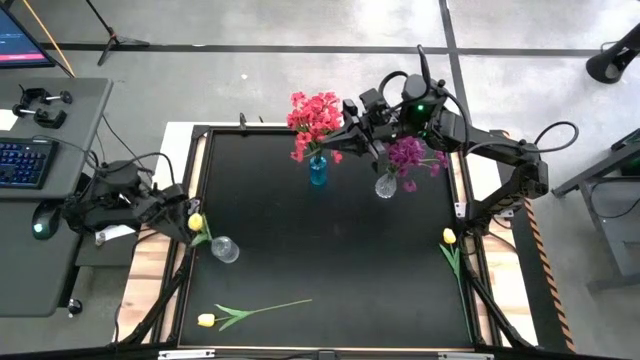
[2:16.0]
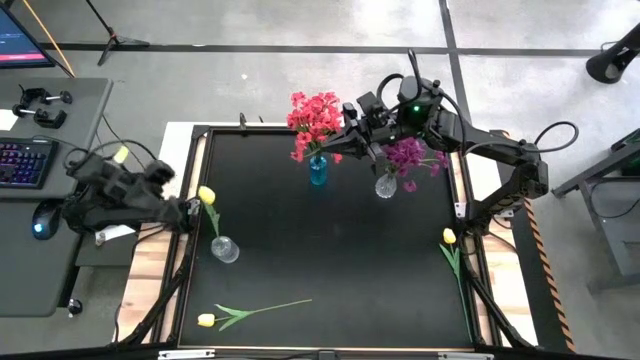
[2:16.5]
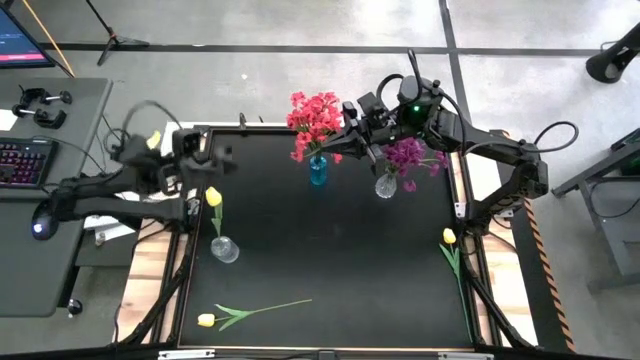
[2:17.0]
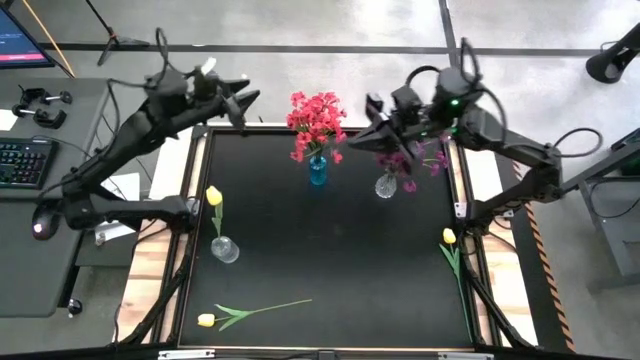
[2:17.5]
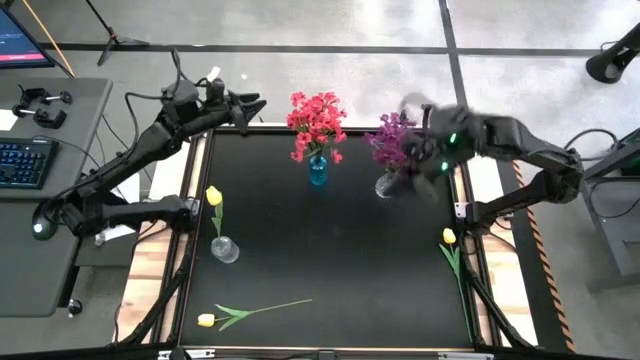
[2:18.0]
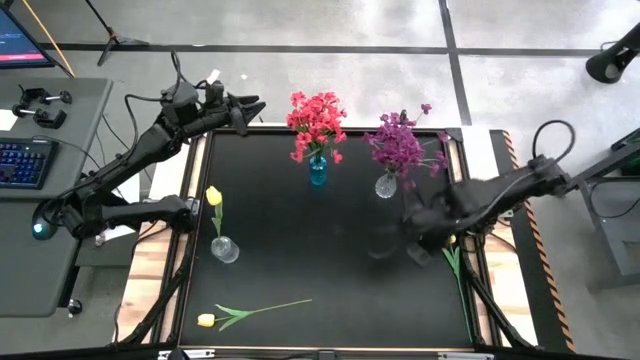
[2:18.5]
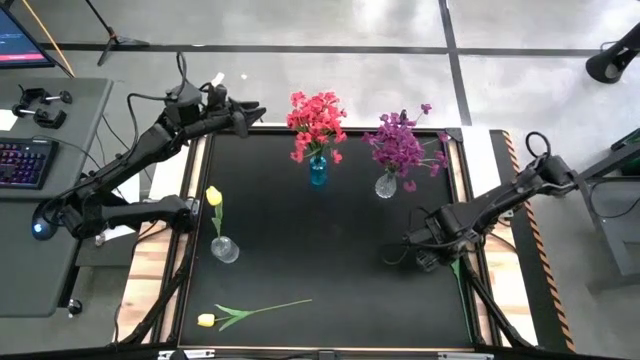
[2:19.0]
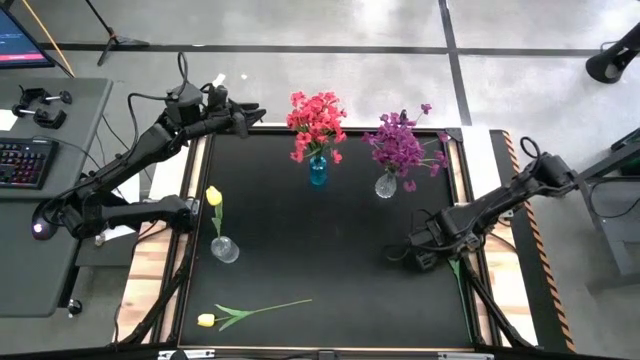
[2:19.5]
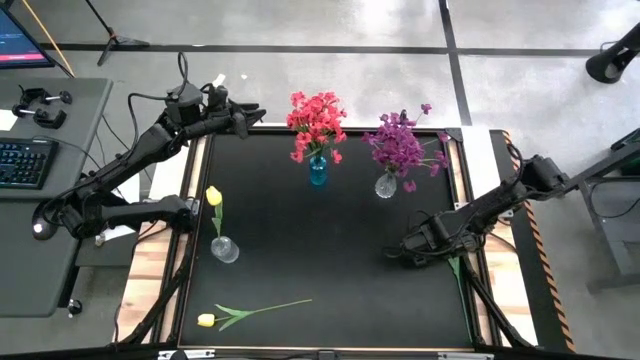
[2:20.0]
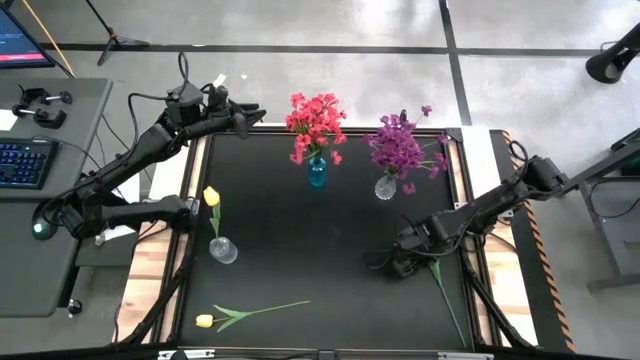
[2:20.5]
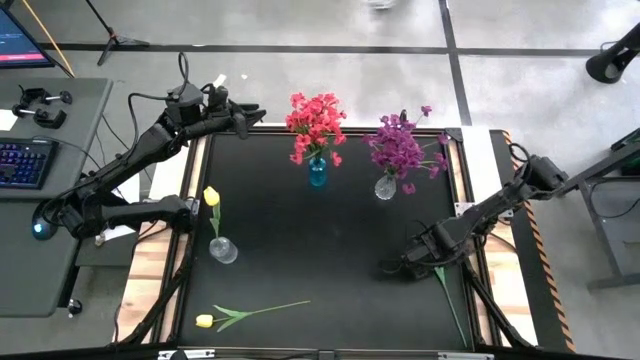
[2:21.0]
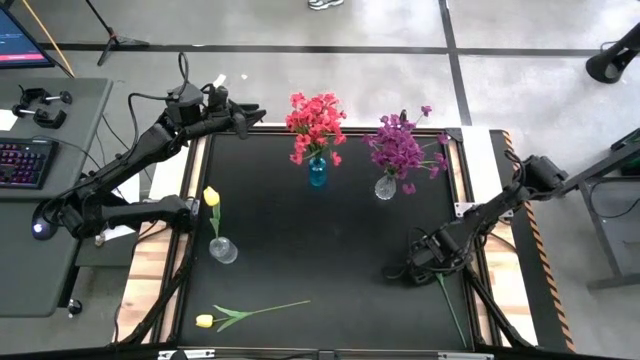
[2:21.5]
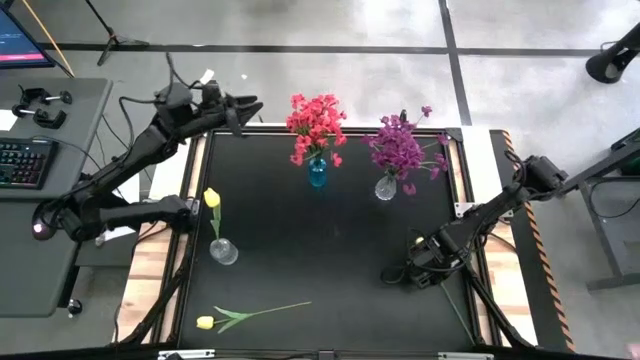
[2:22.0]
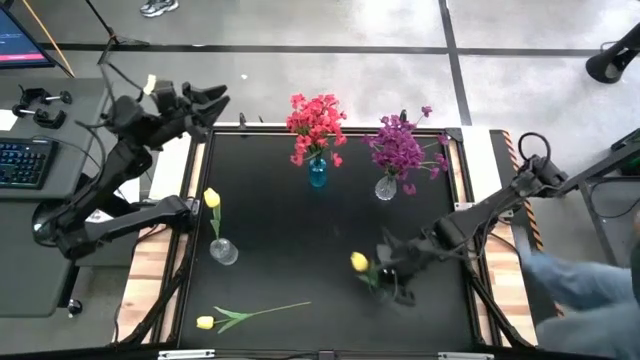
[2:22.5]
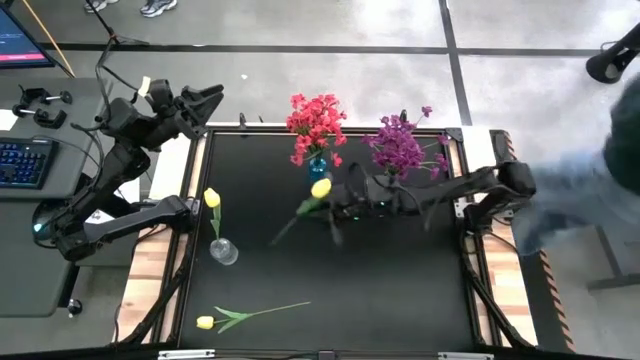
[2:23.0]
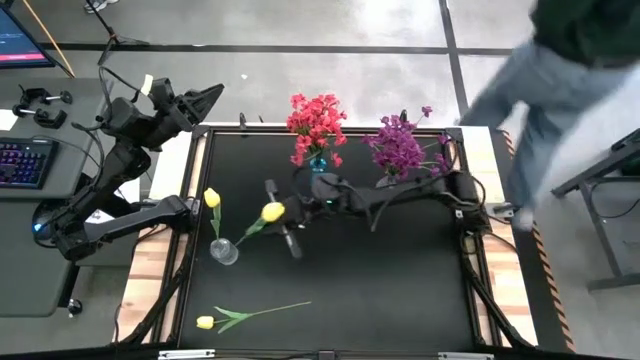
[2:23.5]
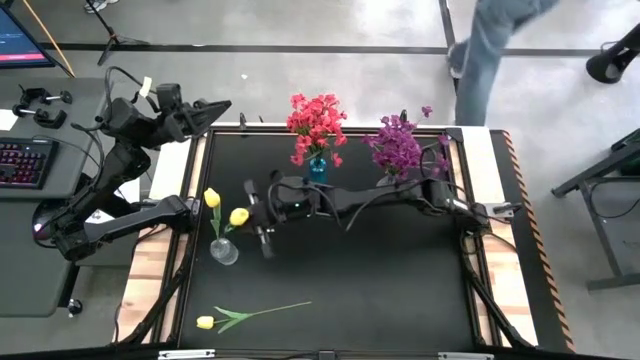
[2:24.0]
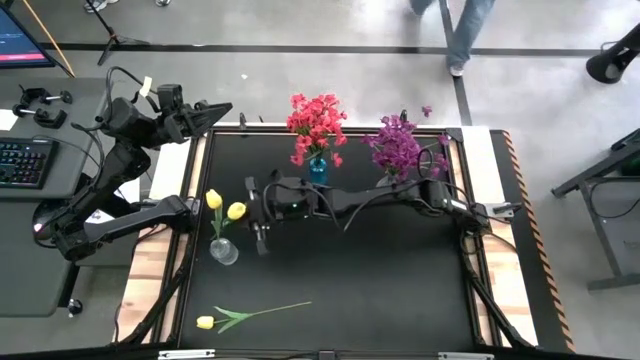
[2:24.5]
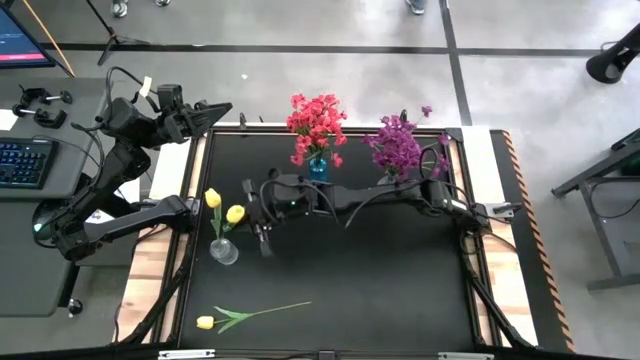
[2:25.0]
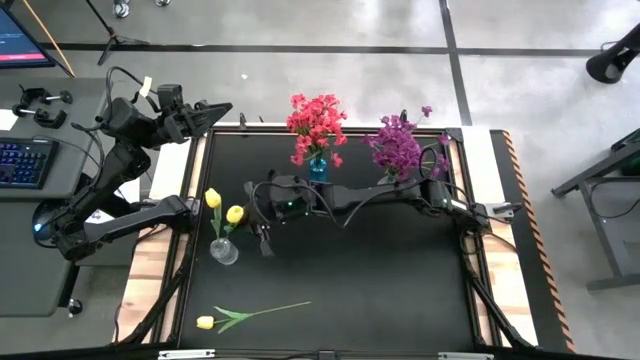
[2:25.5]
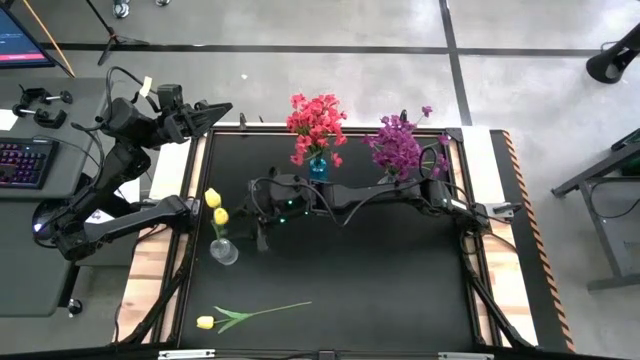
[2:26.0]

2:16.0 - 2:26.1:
Task: Sort flowers into vase by color
Put the right yellow flower into the bottom transparent vase

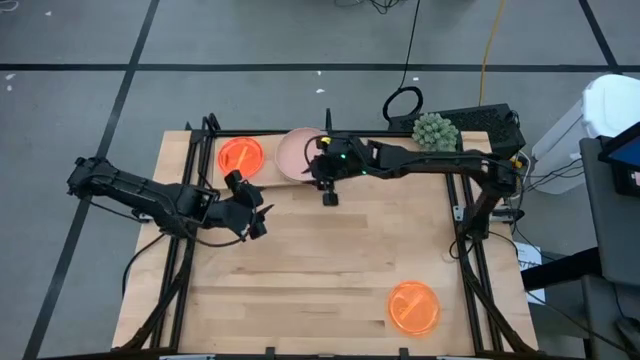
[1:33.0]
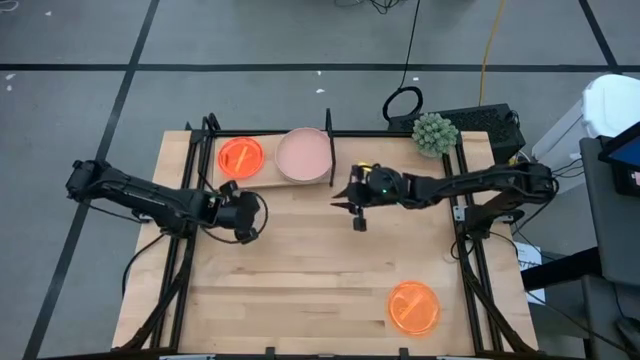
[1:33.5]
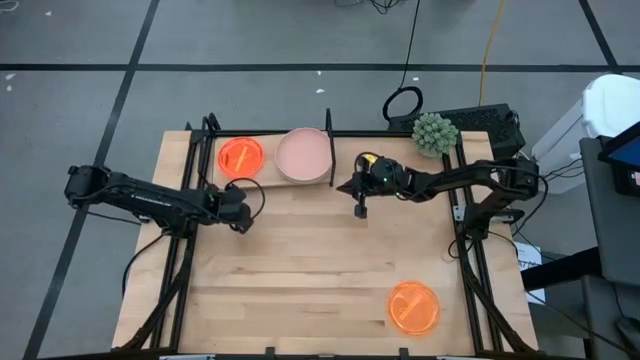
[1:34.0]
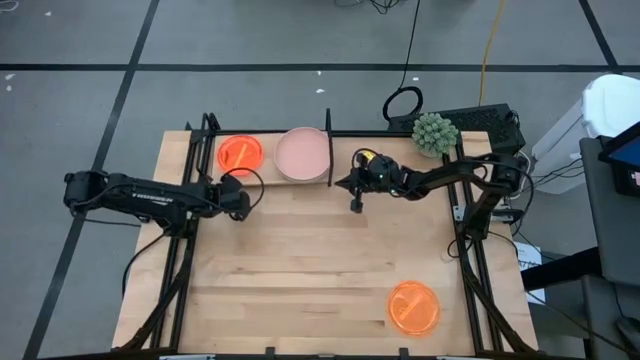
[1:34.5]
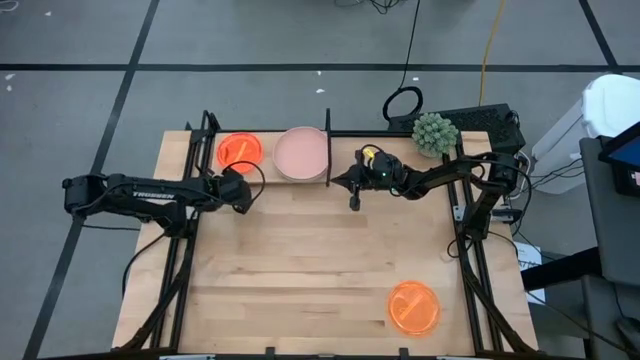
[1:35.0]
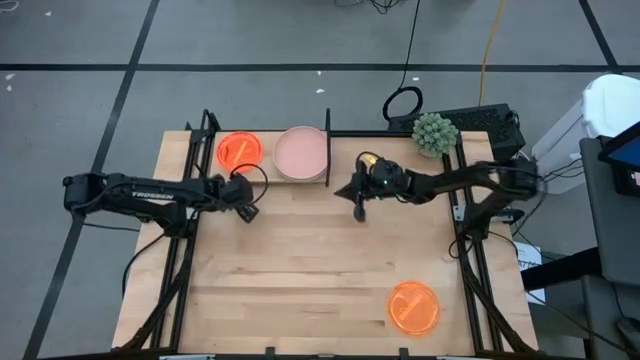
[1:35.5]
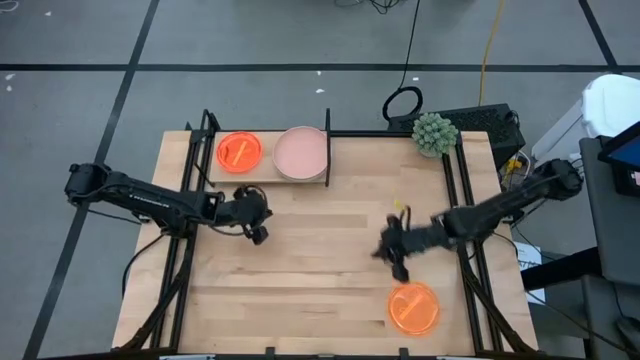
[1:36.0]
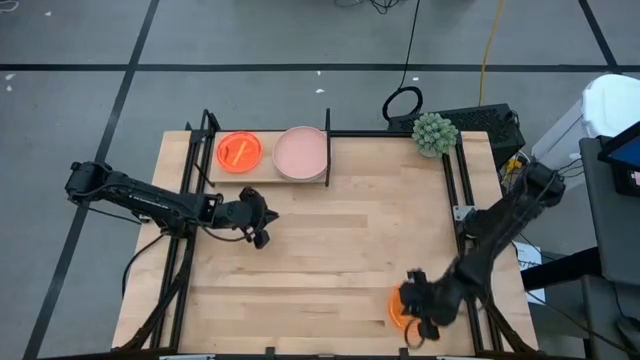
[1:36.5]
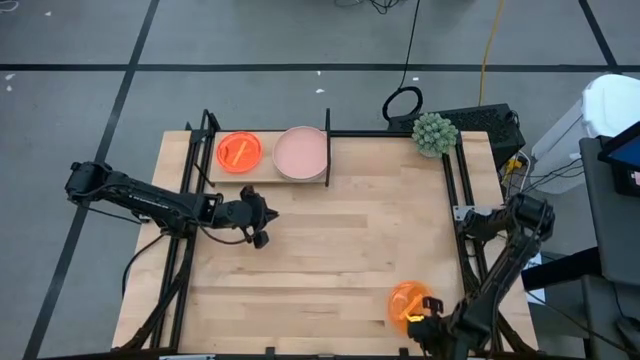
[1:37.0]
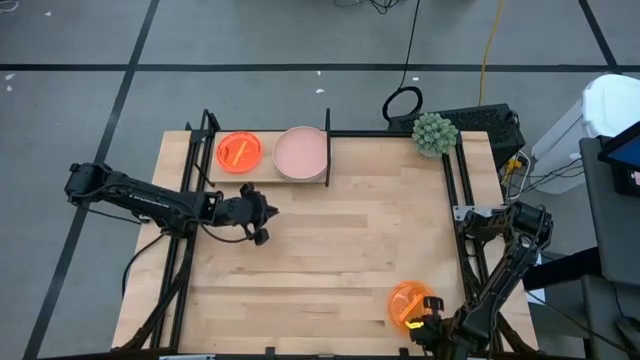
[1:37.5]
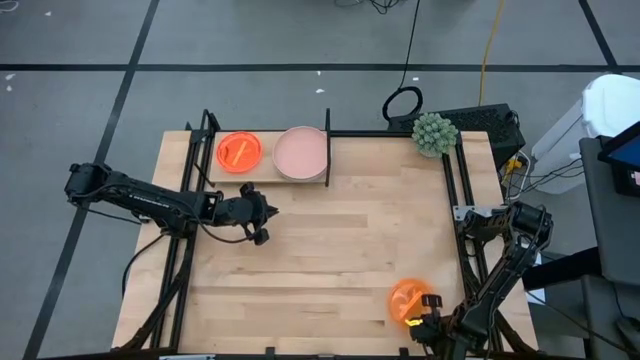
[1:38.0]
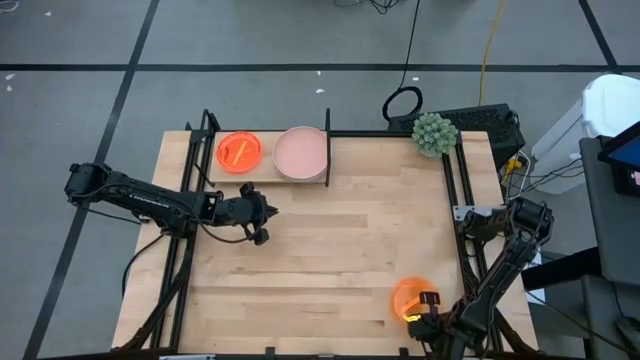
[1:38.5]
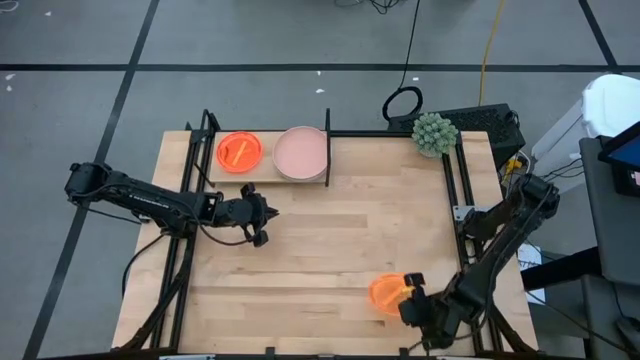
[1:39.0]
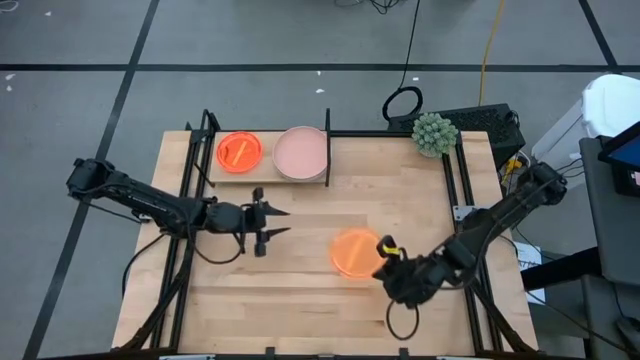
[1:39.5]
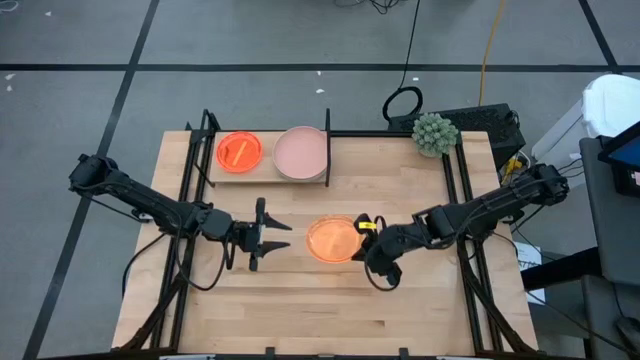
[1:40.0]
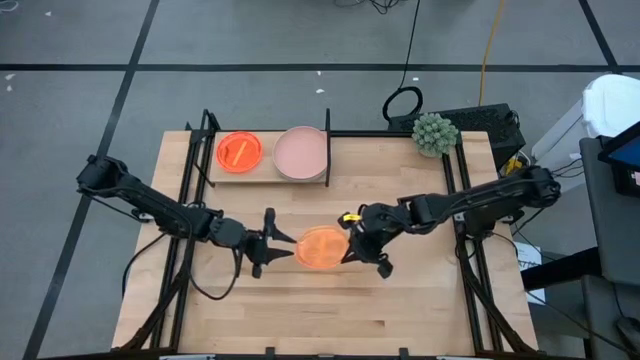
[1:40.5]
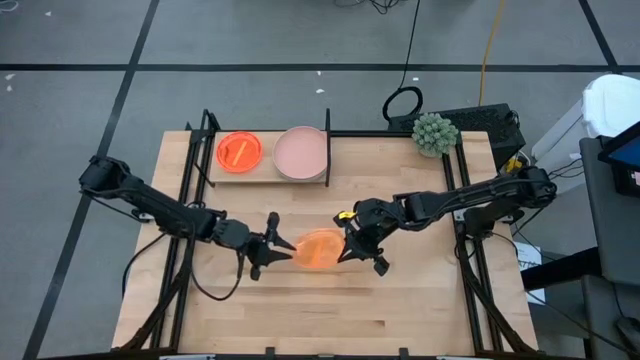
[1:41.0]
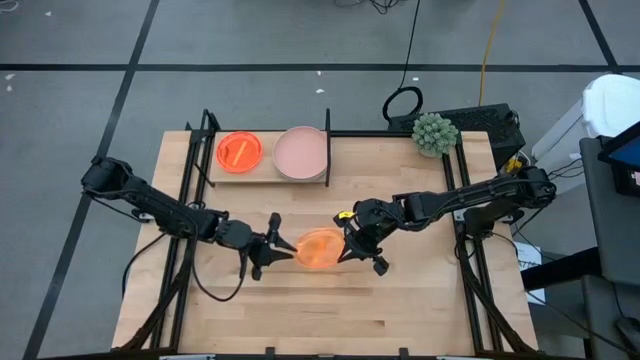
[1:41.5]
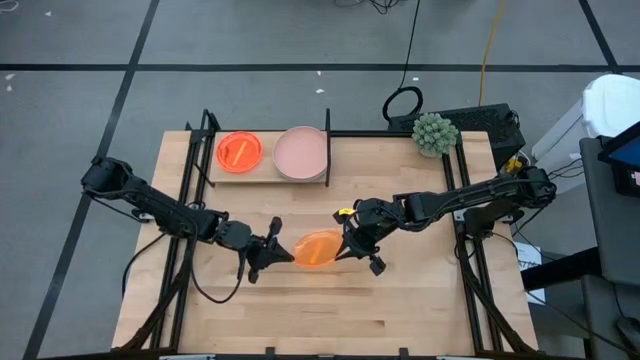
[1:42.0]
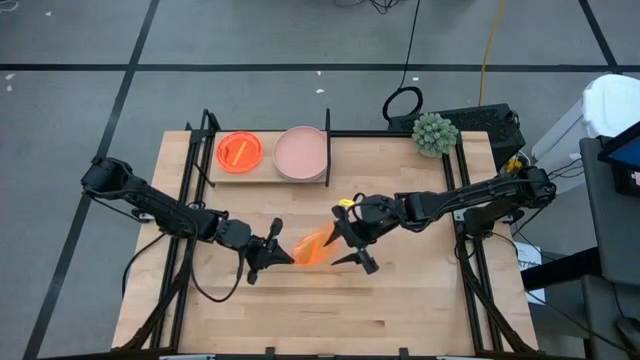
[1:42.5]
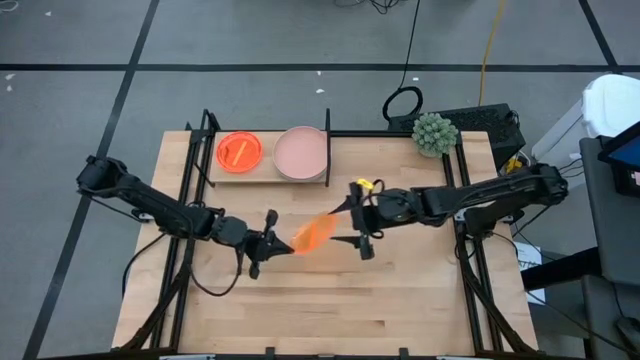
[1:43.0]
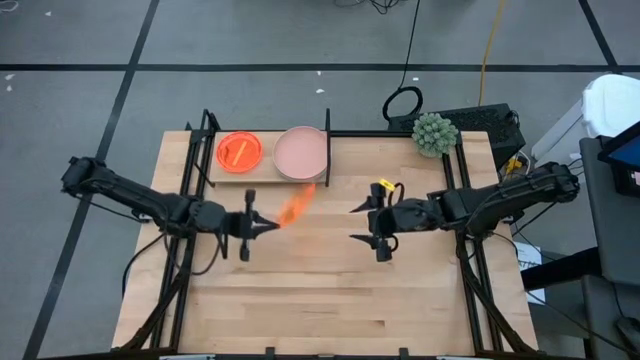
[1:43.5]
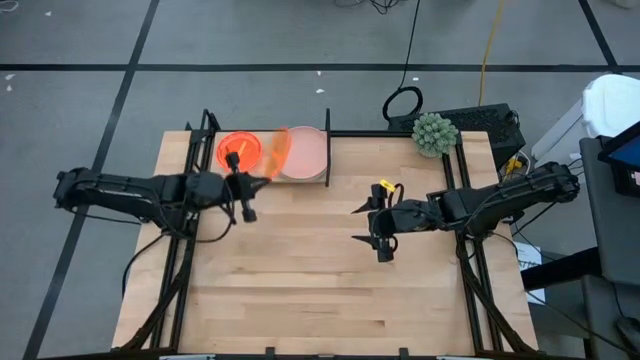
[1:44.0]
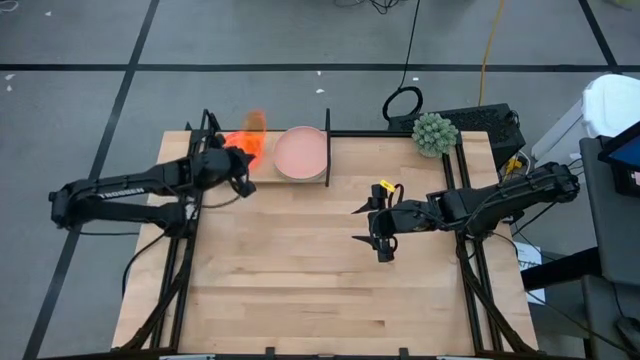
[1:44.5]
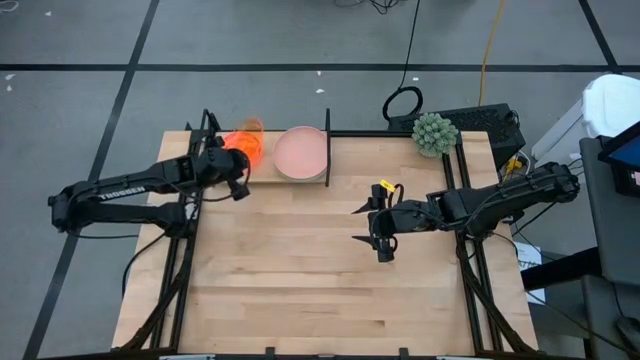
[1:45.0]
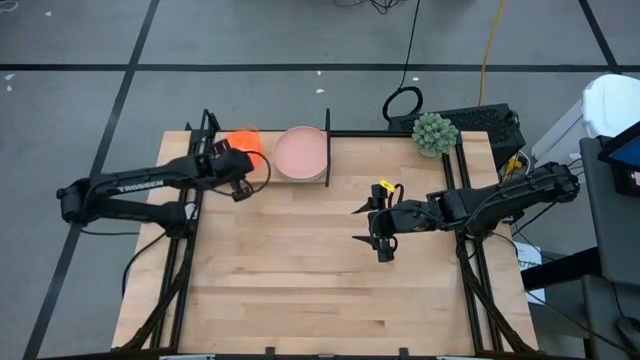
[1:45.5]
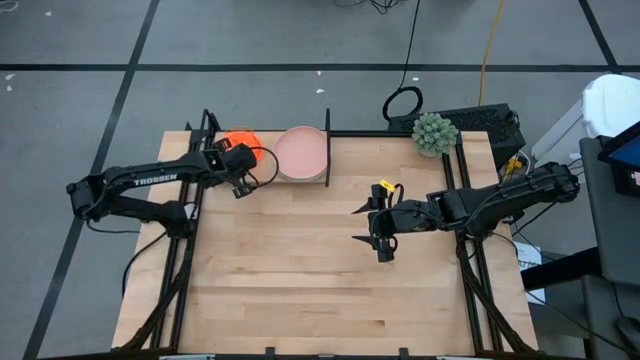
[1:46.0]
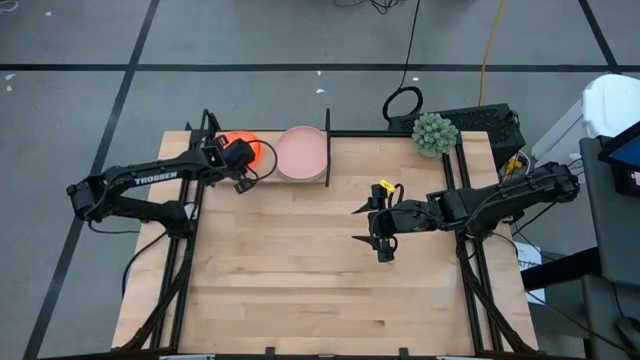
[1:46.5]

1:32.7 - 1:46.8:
Task: Place and stack plates onto a shelf
Stack the transparent orange plate on top of the orange transparent plate on the shelf
